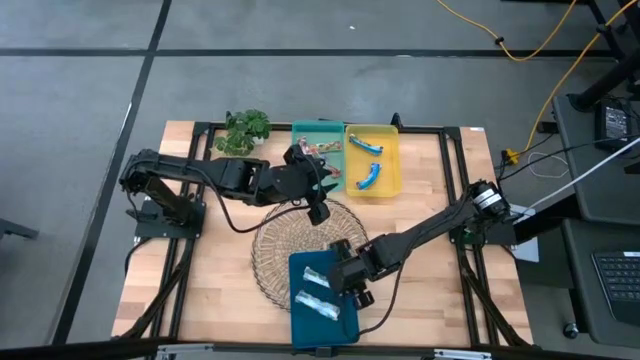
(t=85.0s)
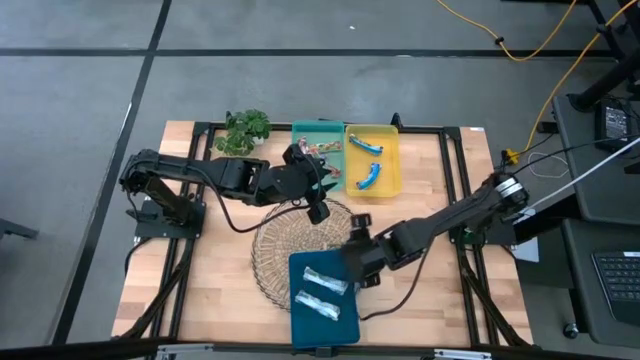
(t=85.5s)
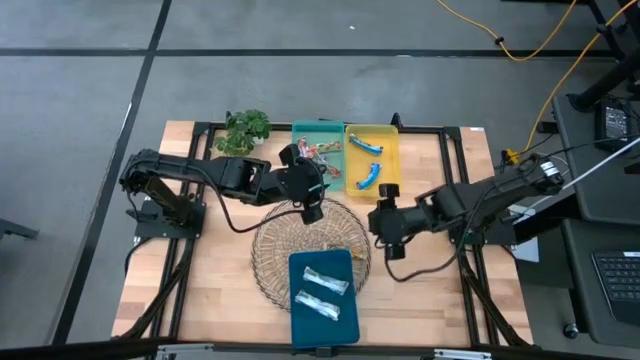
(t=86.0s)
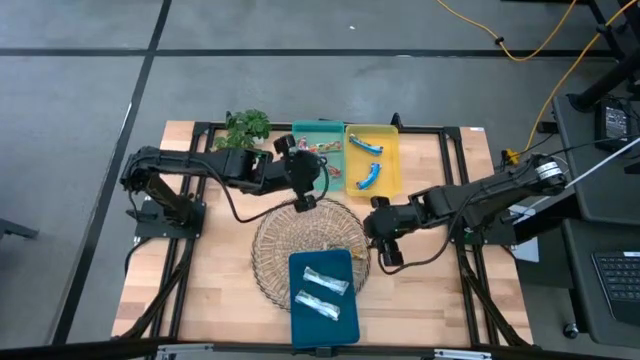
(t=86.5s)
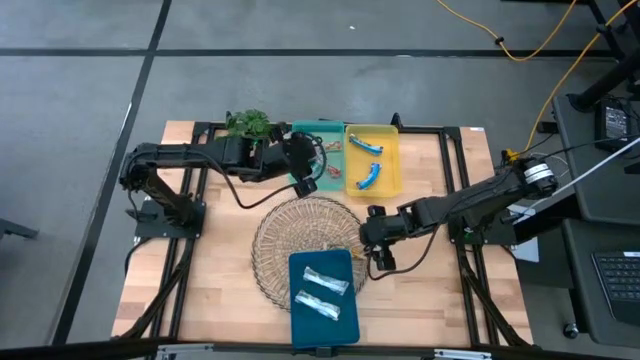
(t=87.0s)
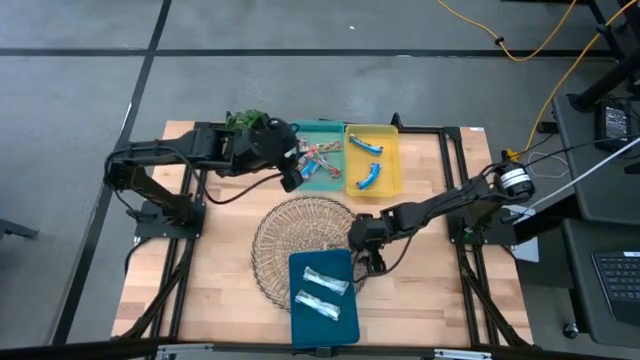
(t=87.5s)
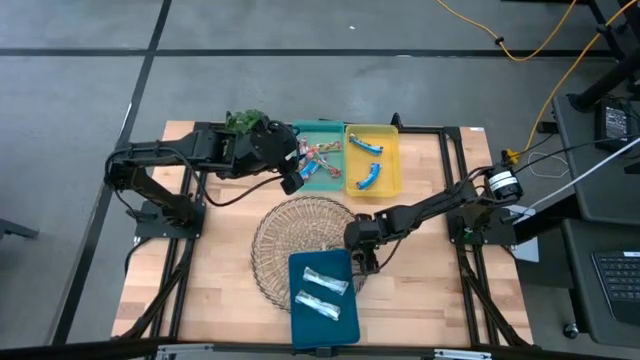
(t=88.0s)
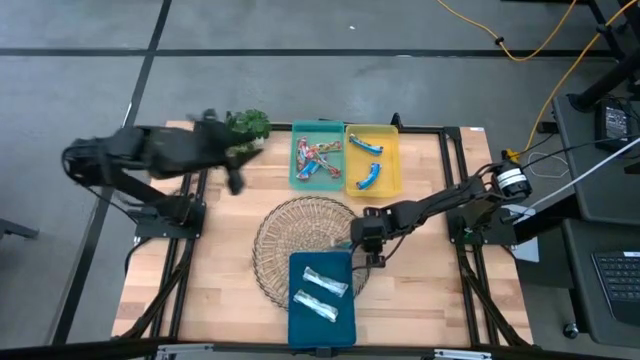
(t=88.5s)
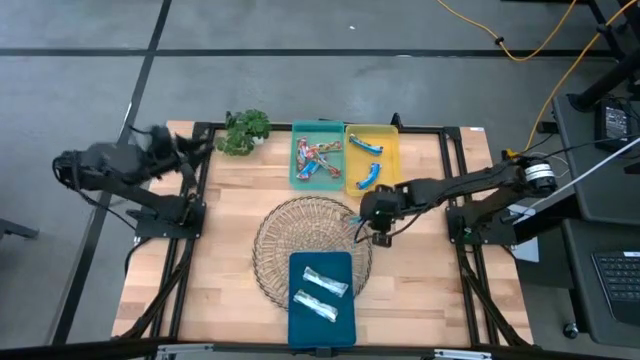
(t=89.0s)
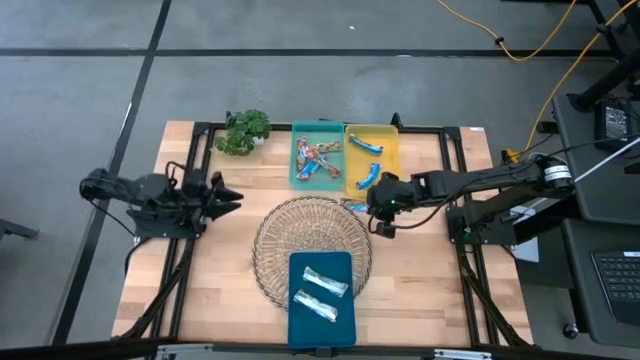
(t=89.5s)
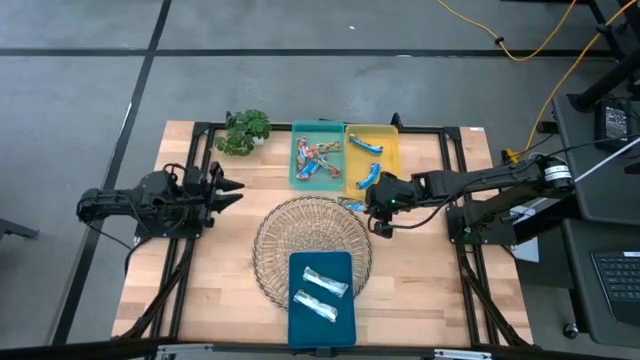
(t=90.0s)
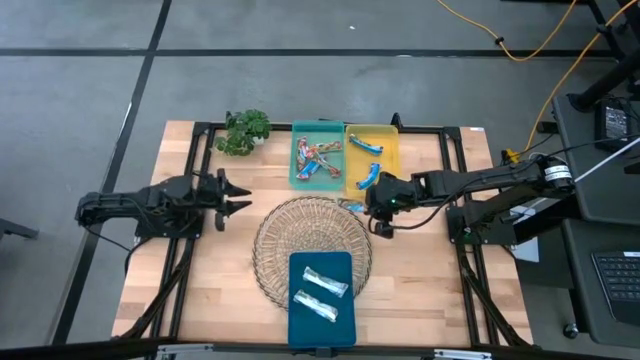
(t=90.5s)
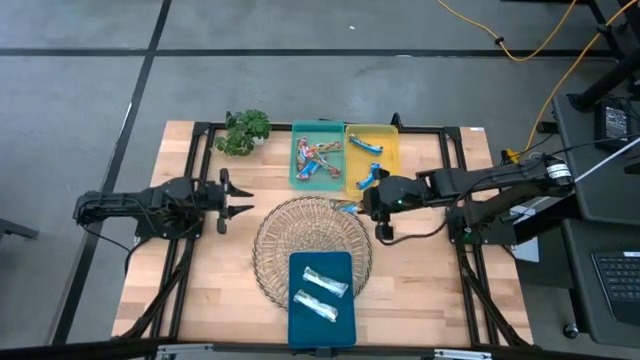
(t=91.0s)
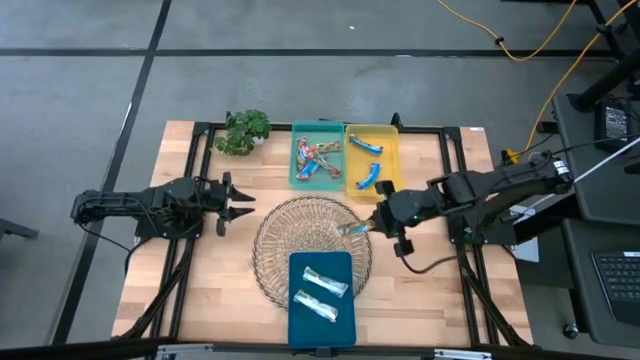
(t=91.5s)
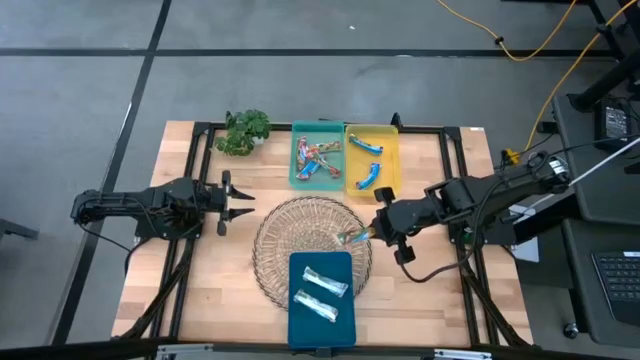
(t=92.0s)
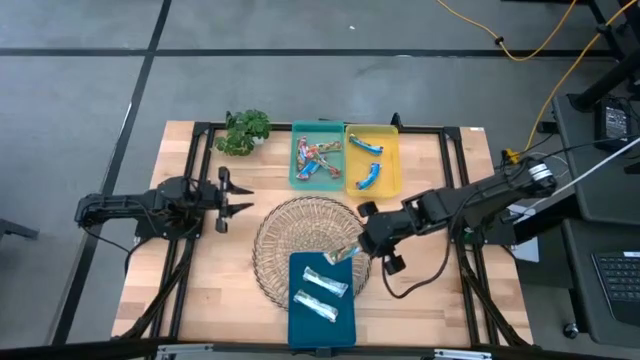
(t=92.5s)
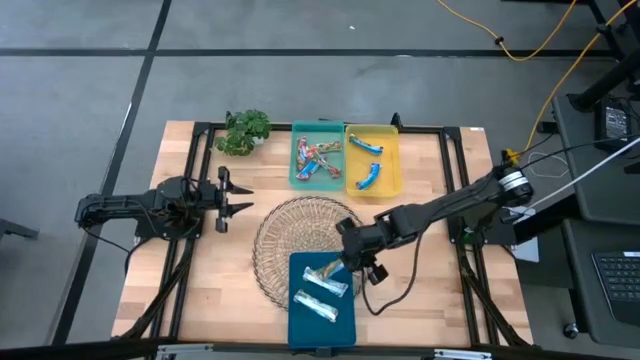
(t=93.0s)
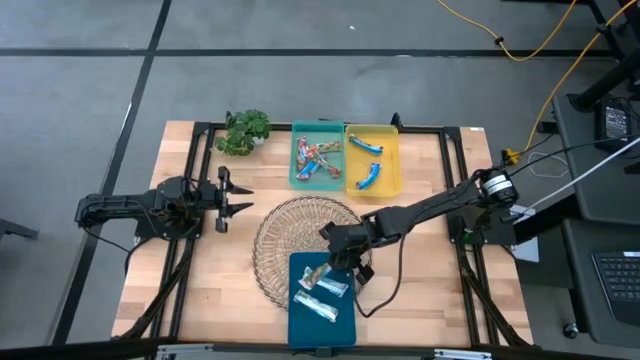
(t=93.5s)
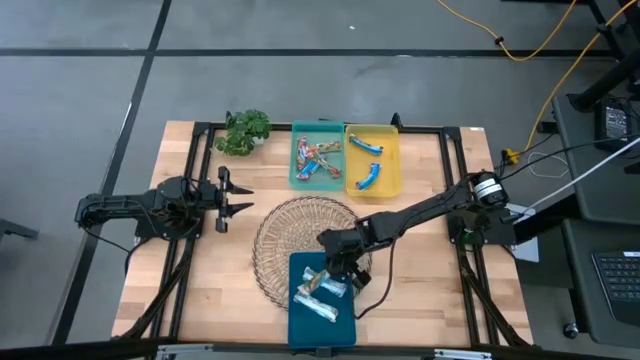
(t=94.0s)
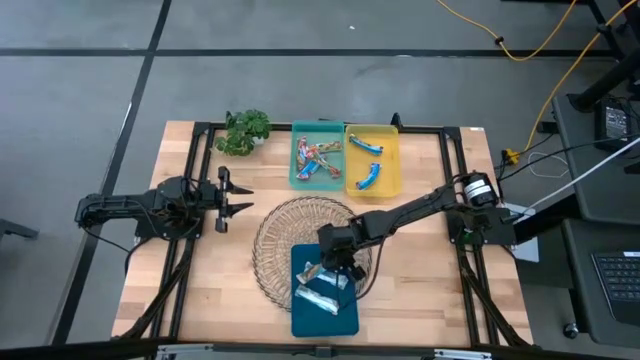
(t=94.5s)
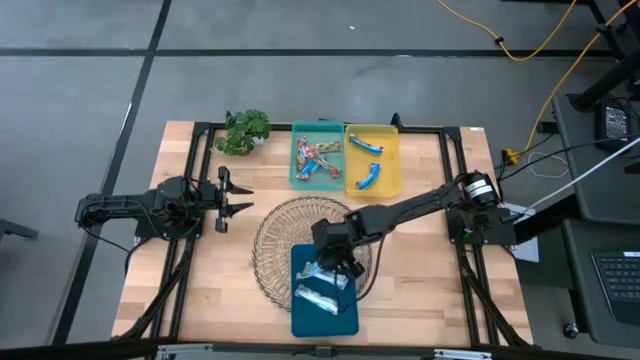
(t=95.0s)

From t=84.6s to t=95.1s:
Task: Pick and place Granola Bars by type
Put the yellow granola bar into the blue container

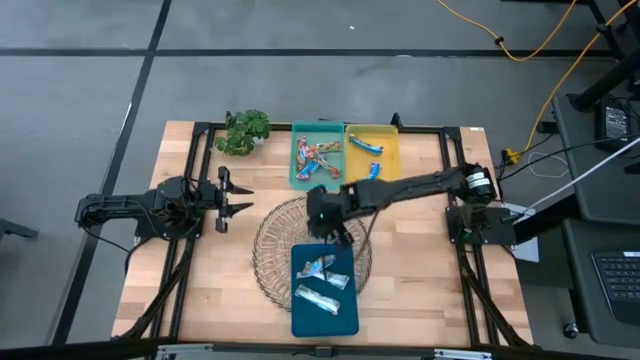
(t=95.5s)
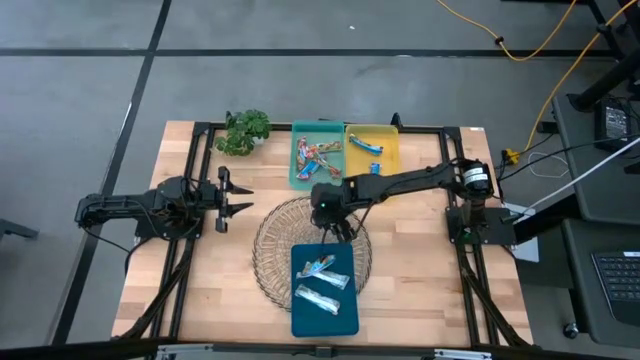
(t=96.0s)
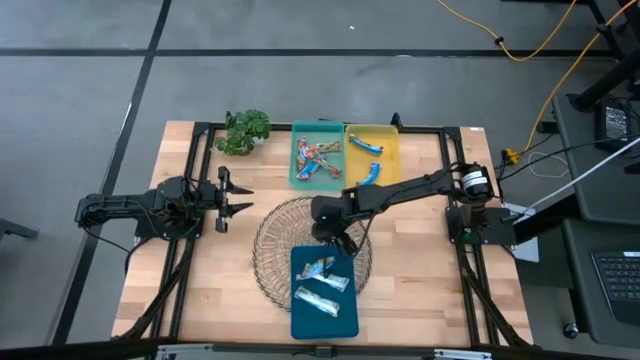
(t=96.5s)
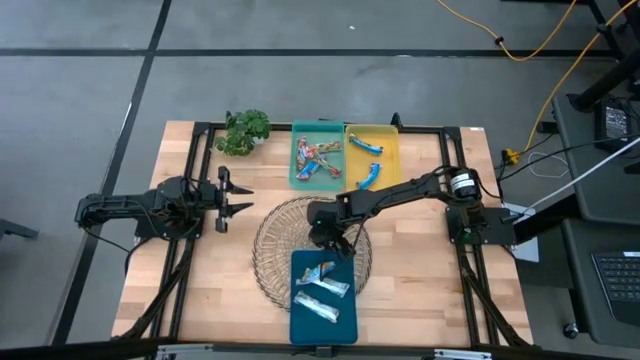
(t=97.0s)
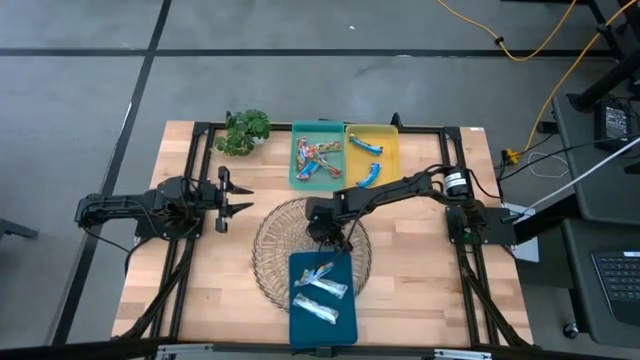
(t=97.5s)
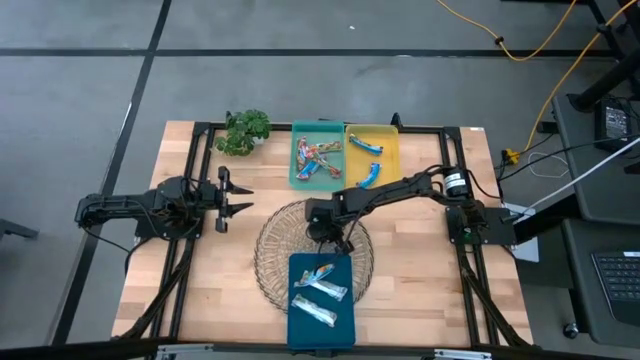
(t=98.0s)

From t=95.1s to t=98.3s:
Adjust the blue container

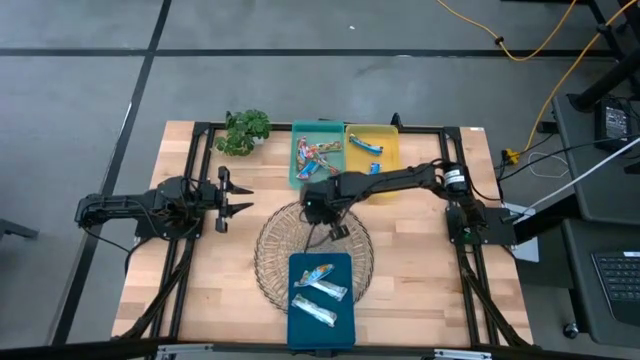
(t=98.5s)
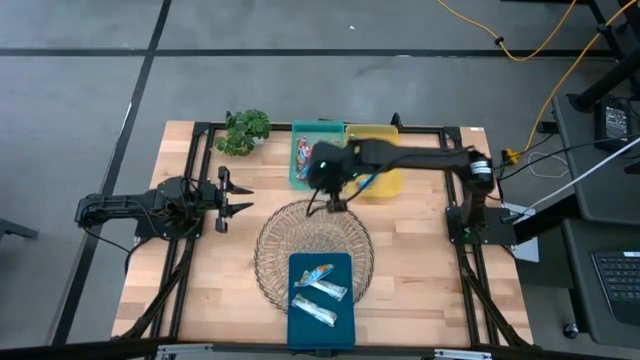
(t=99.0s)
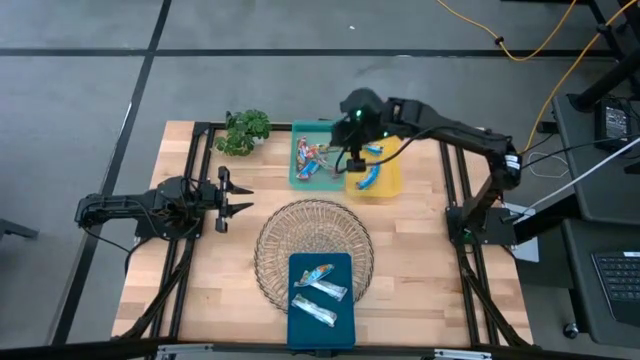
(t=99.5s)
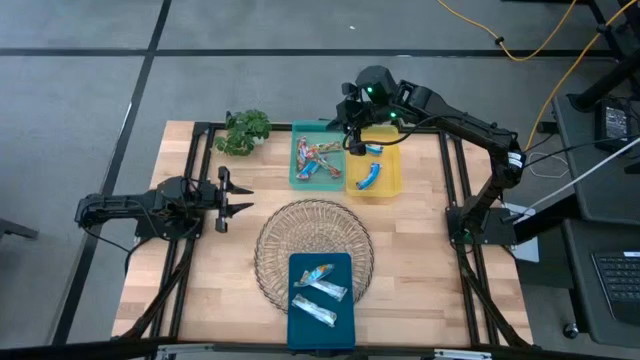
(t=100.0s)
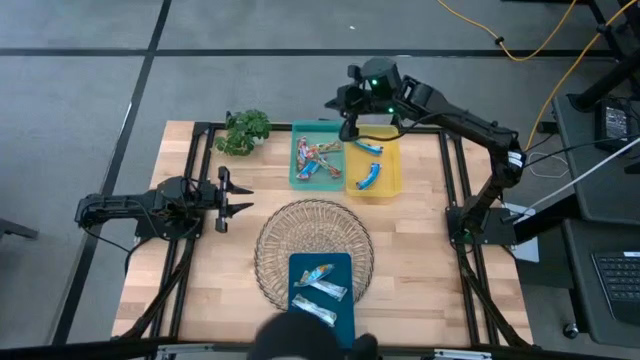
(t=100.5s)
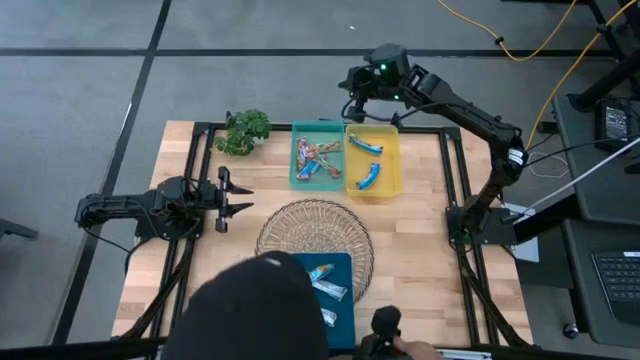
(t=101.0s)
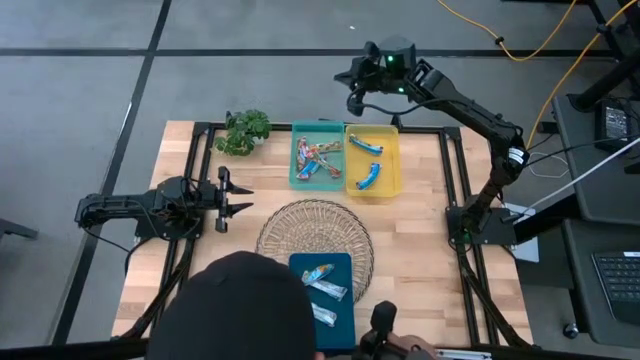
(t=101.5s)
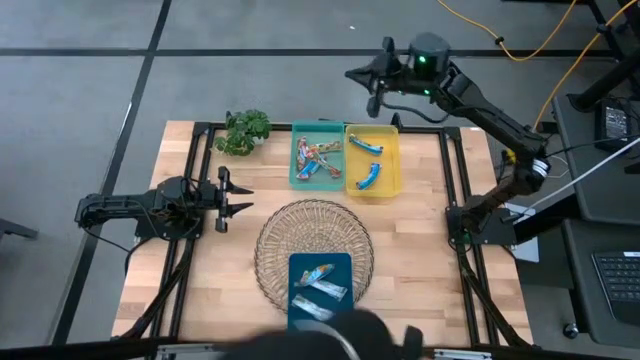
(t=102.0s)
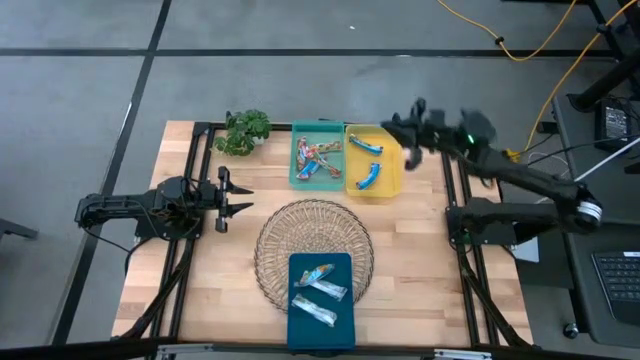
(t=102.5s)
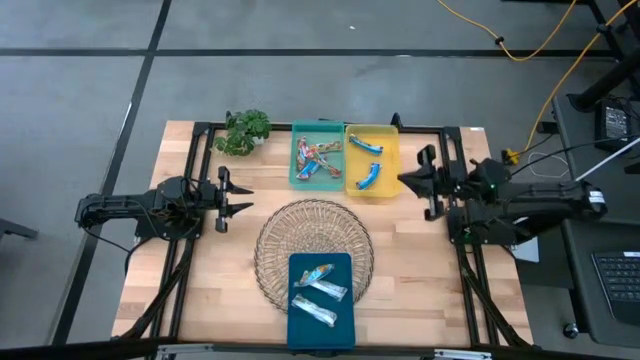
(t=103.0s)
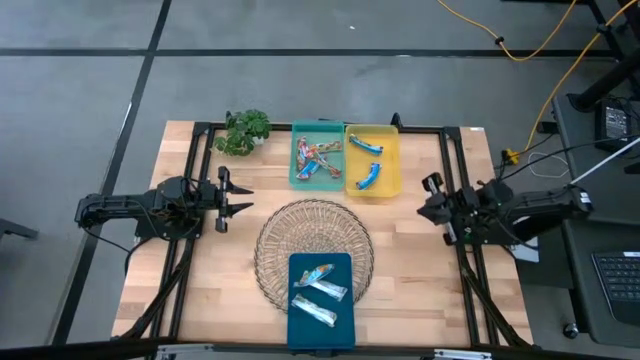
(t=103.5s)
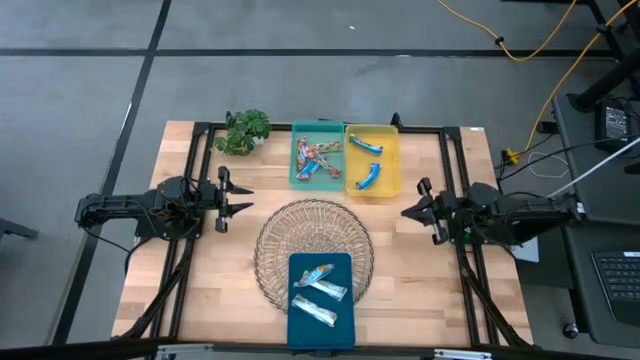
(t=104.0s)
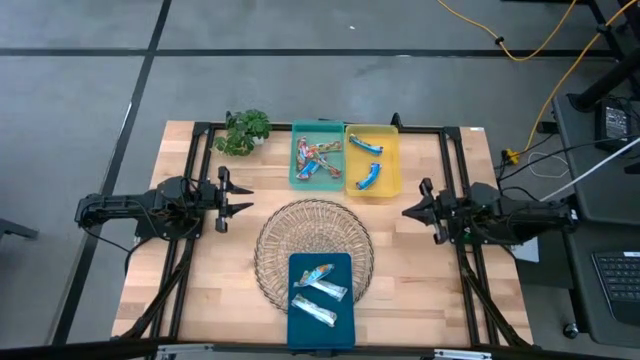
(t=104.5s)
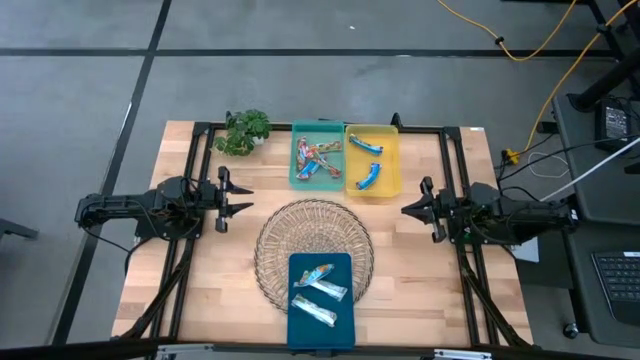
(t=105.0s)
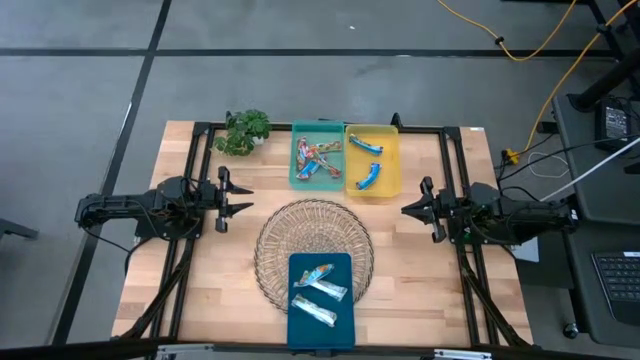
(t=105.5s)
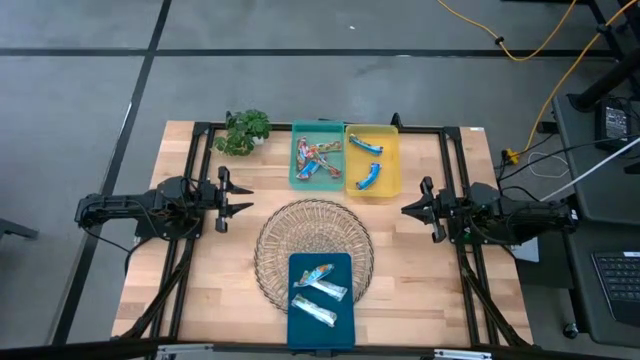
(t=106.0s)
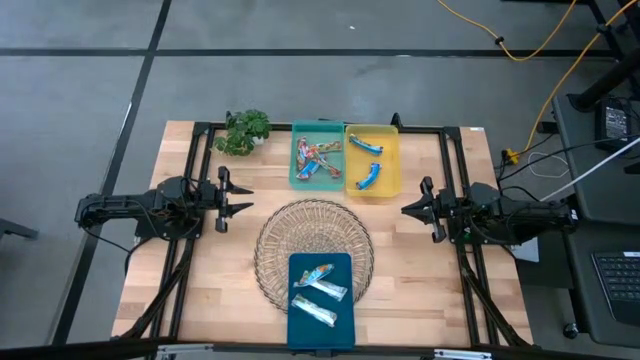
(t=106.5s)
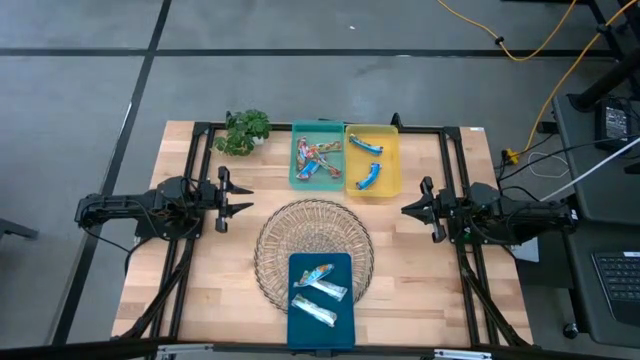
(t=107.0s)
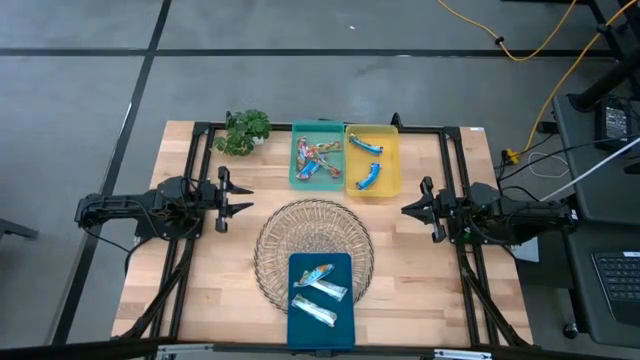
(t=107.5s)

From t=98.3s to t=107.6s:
Return to Home Position
